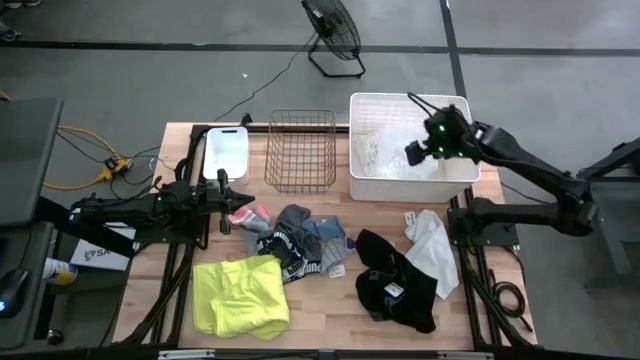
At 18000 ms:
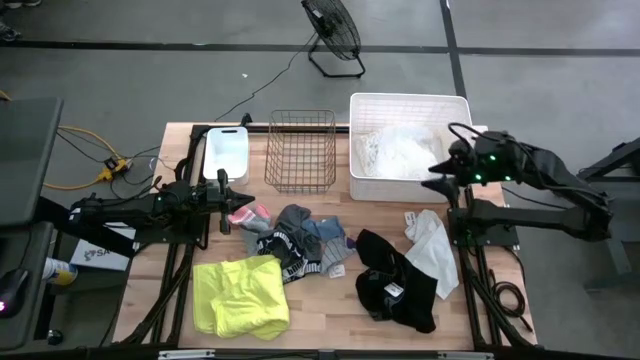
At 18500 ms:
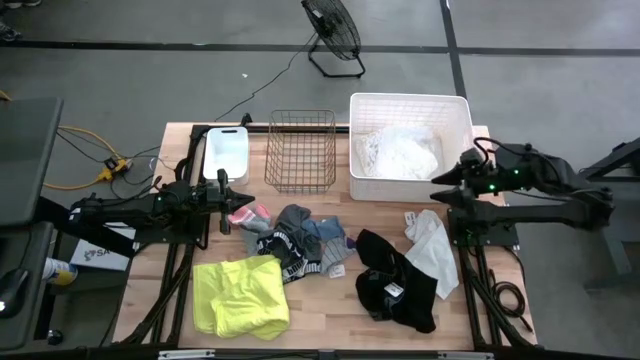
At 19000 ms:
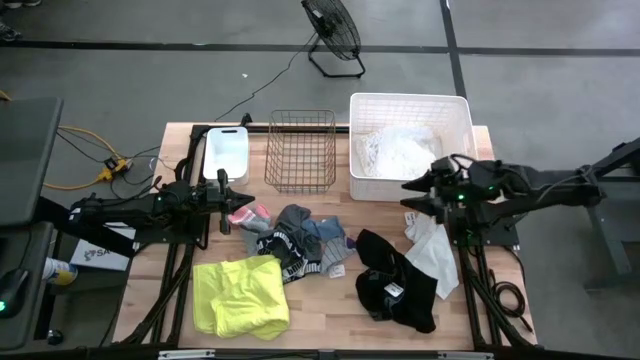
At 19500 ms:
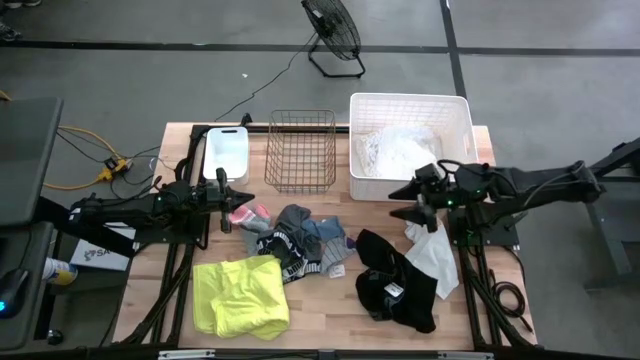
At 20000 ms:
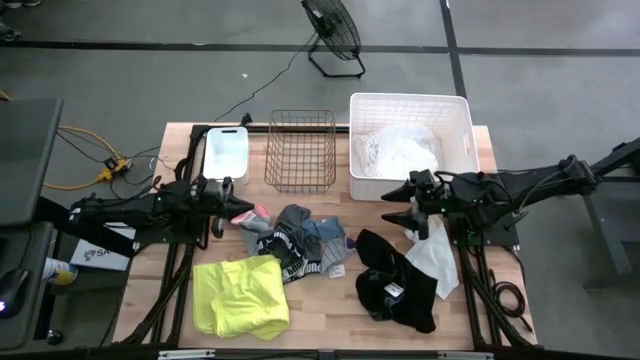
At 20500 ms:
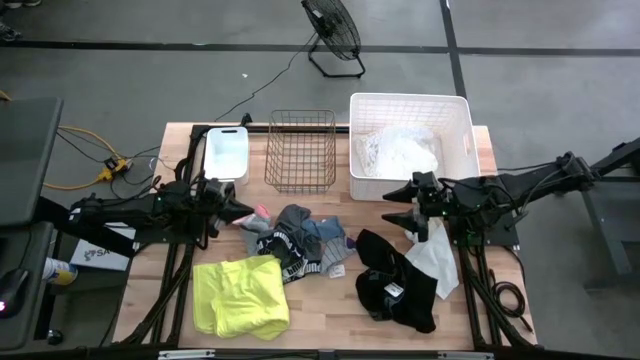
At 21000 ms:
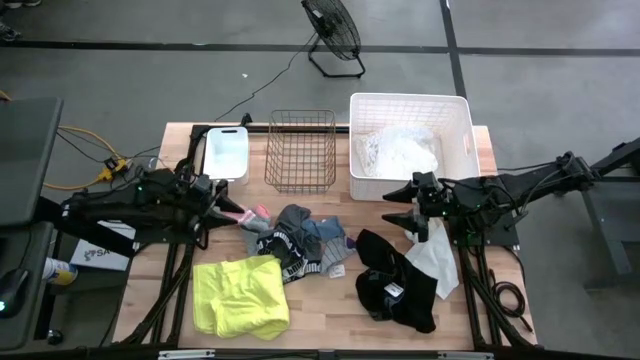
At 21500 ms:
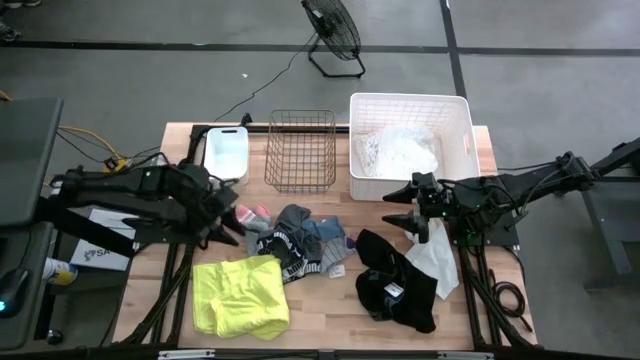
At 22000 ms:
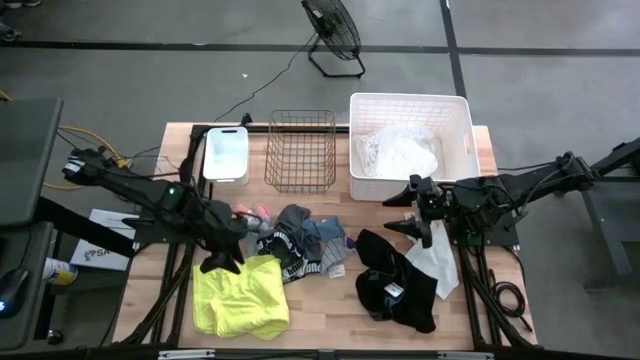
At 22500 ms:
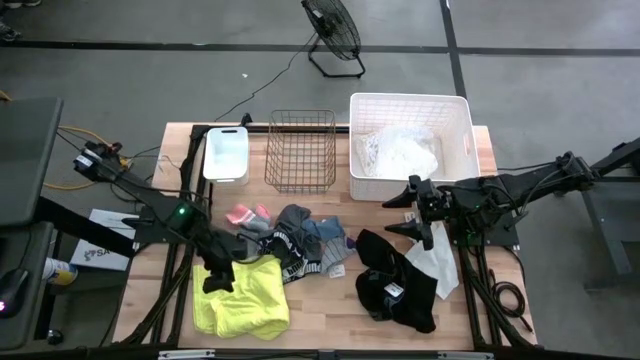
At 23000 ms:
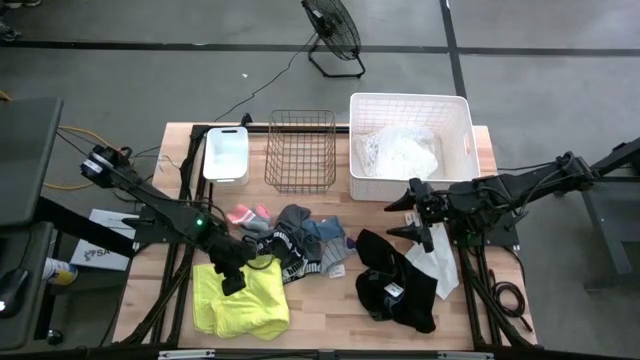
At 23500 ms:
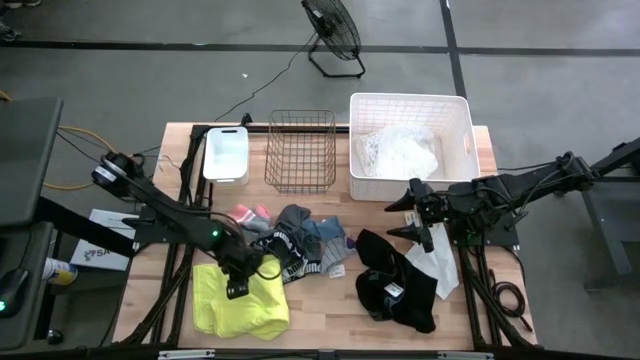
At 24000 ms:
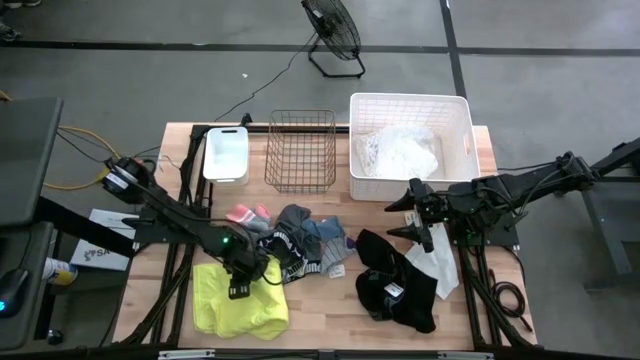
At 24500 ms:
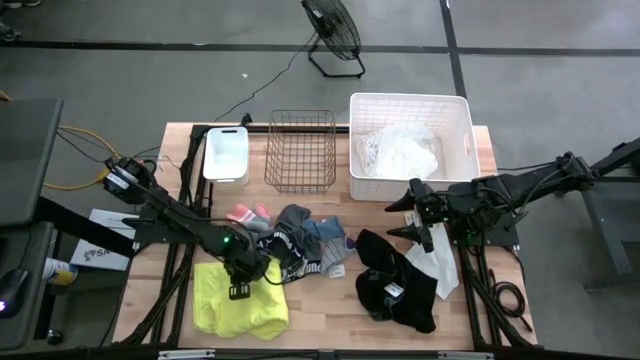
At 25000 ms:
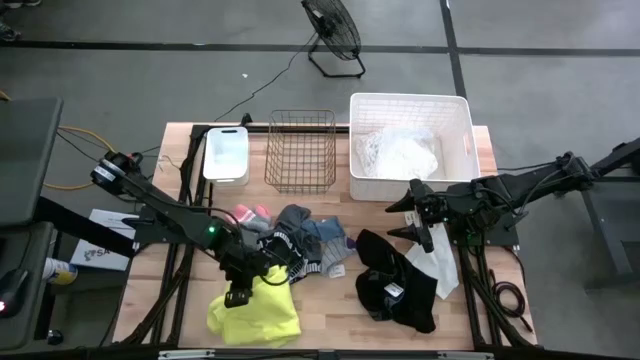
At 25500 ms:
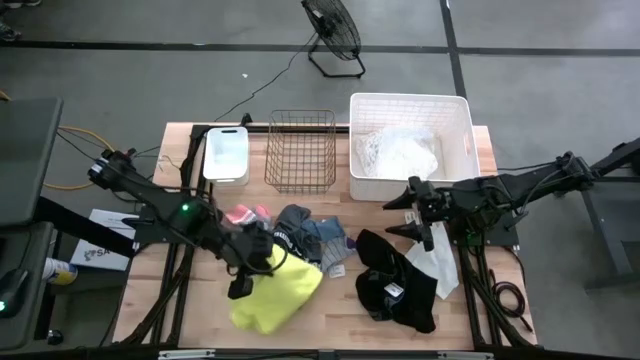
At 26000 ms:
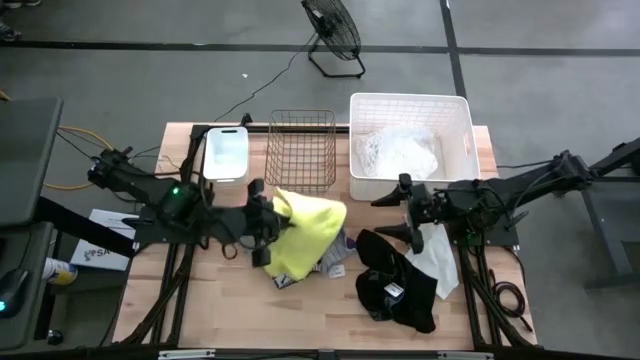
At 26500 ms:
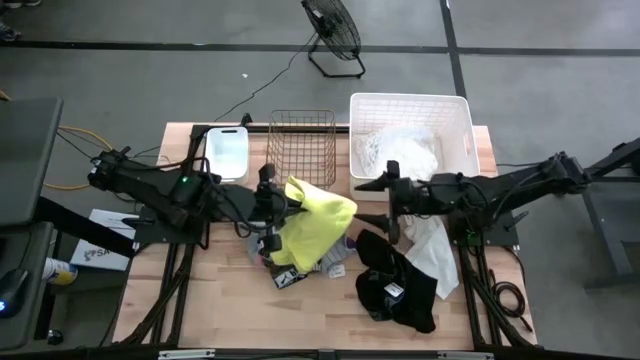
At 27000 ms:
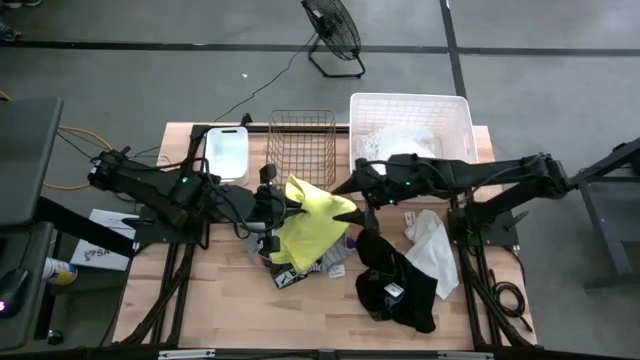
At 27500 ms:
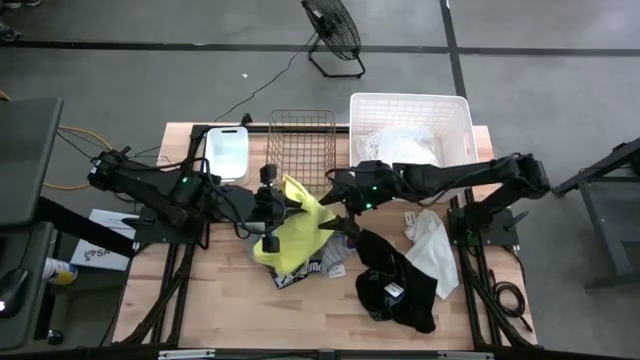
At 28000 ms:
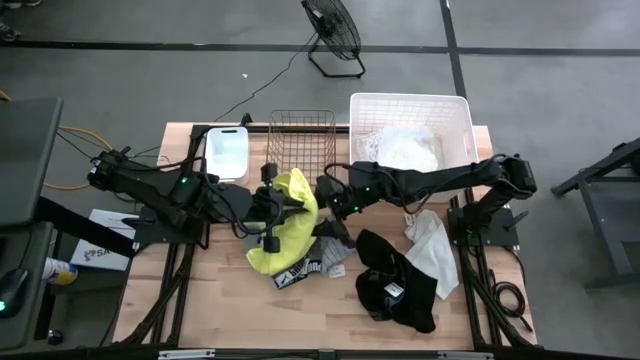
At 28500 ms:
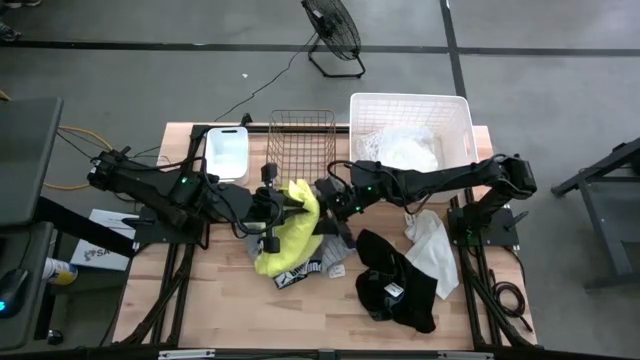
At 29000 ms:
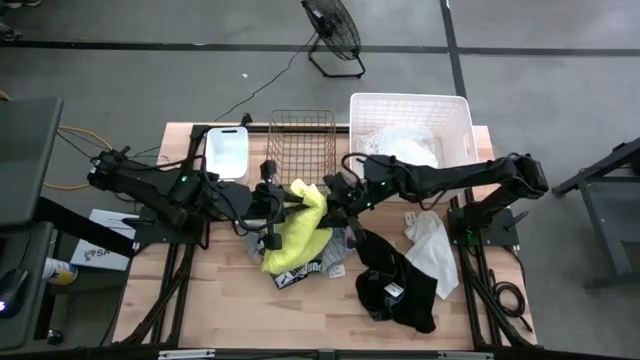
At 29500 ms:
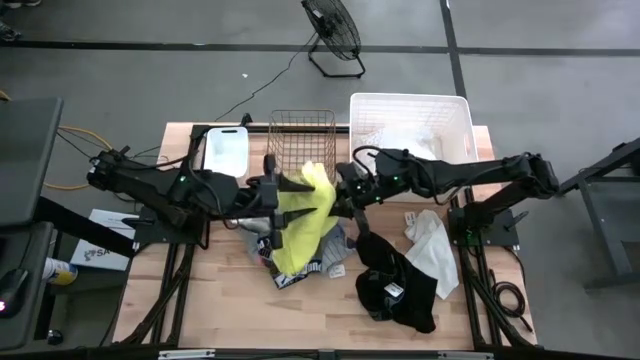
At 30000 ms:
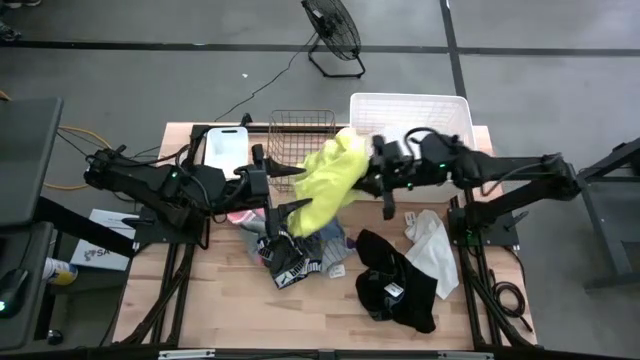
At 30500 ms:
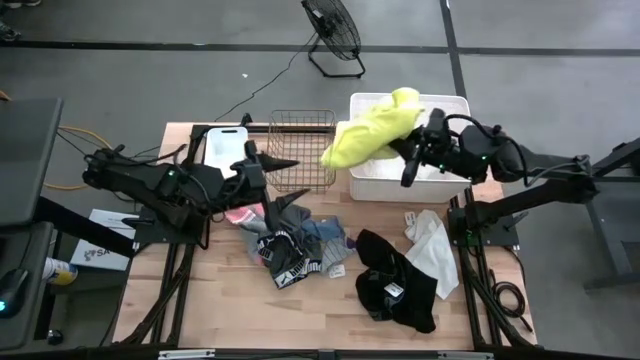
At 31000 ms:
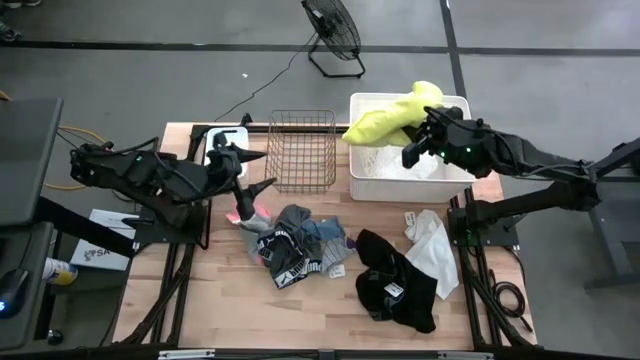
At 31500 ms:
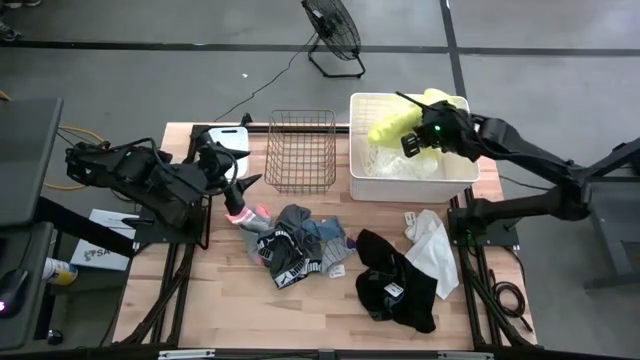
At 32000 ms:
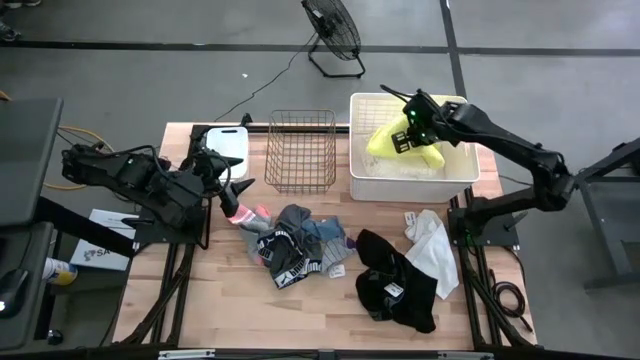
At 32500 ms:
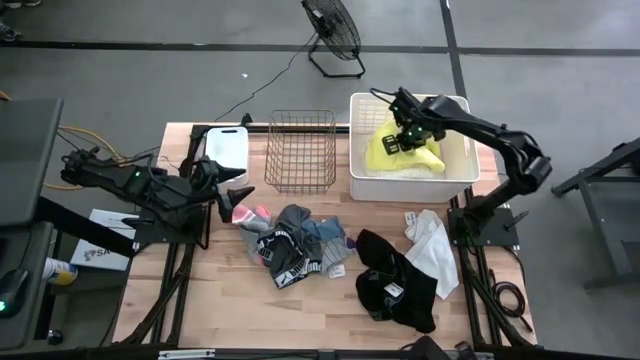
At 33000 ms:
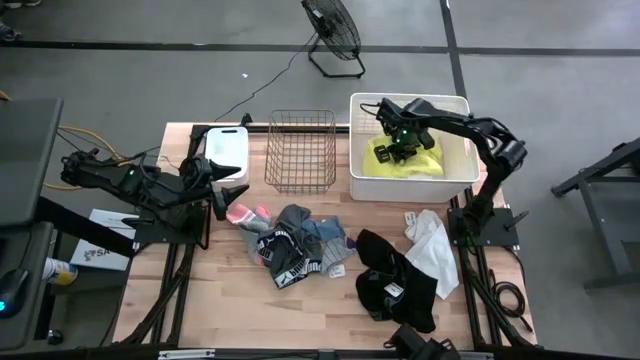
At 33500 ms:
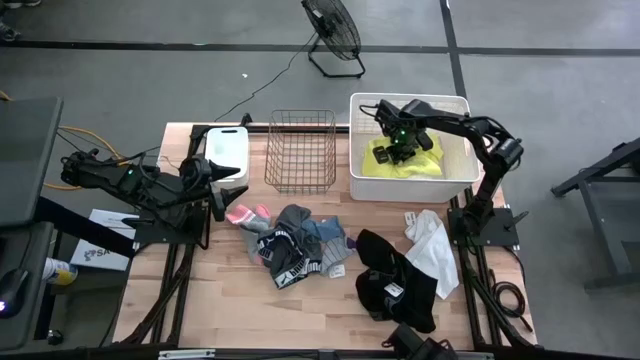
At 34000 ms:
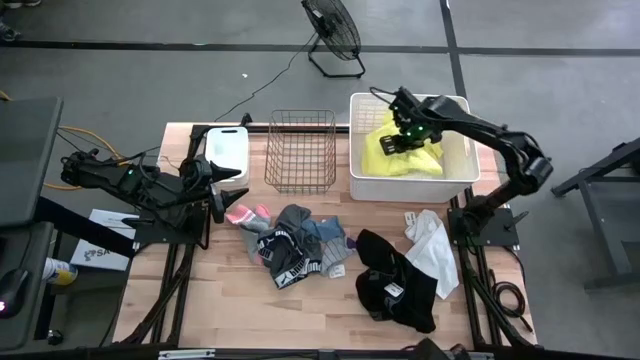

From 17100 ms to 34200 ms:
Task: Pick & Place Cloths
Put the yellow shirt into the right white bin

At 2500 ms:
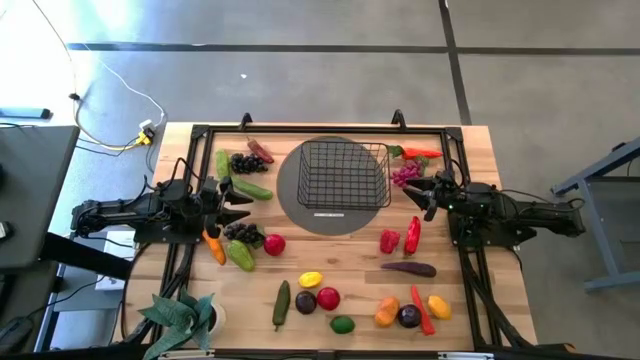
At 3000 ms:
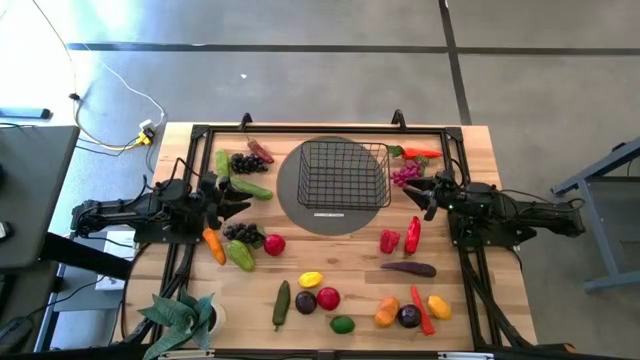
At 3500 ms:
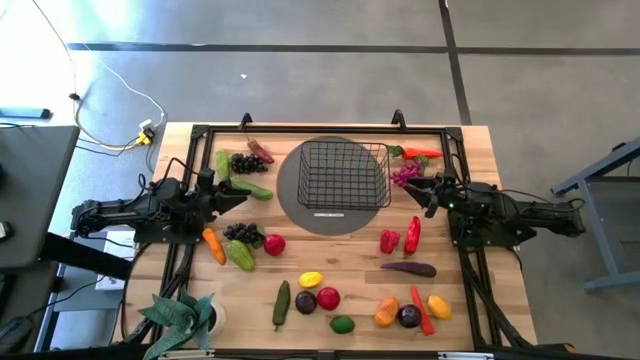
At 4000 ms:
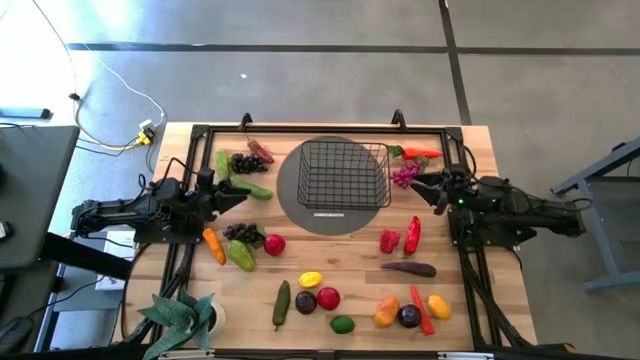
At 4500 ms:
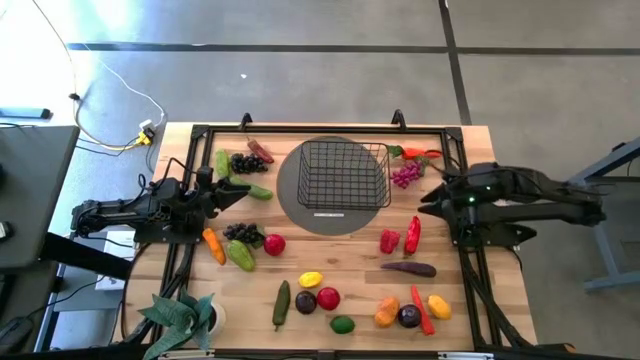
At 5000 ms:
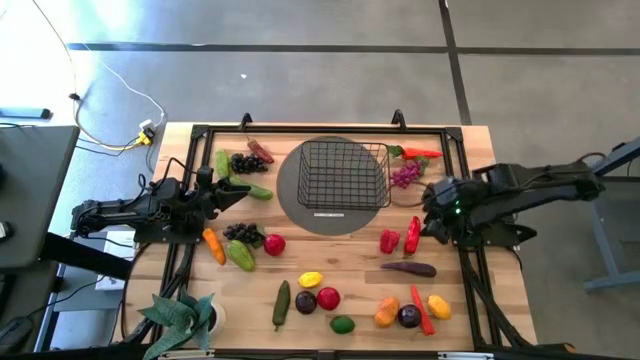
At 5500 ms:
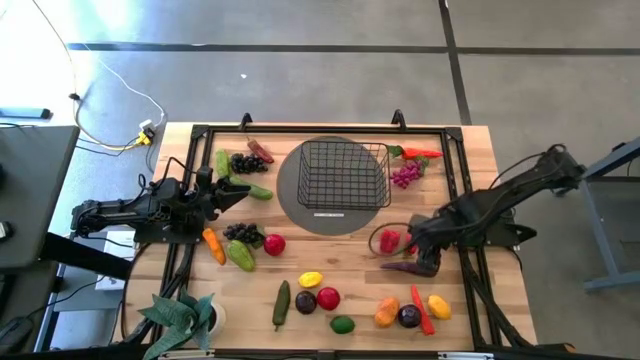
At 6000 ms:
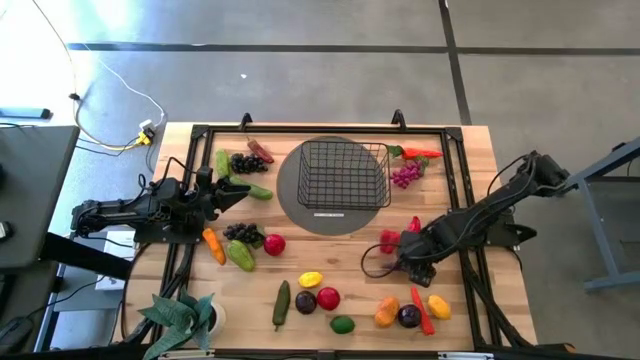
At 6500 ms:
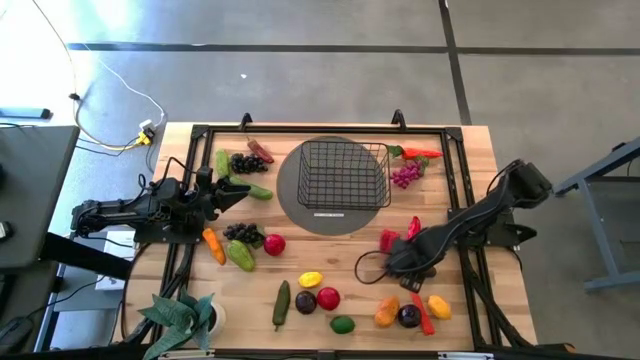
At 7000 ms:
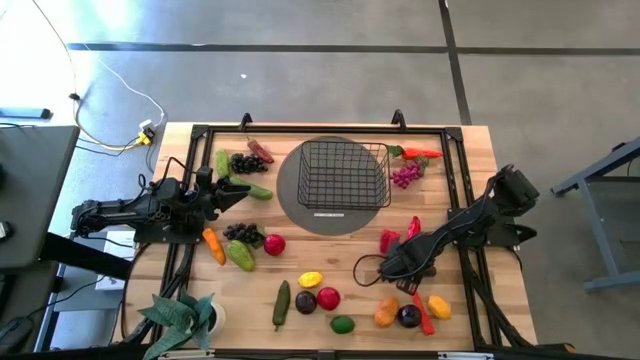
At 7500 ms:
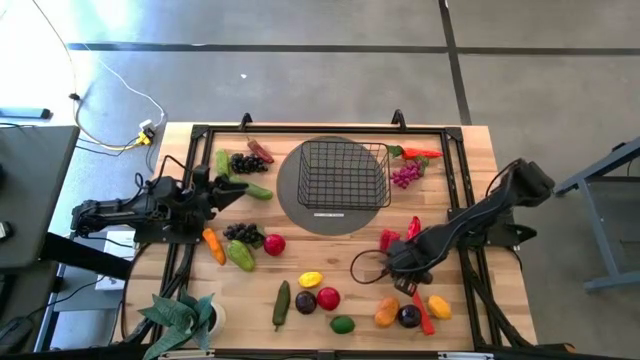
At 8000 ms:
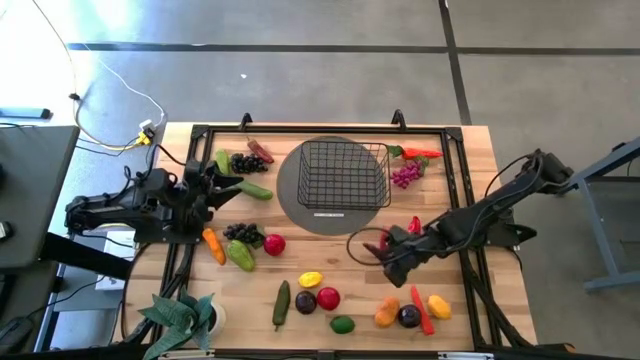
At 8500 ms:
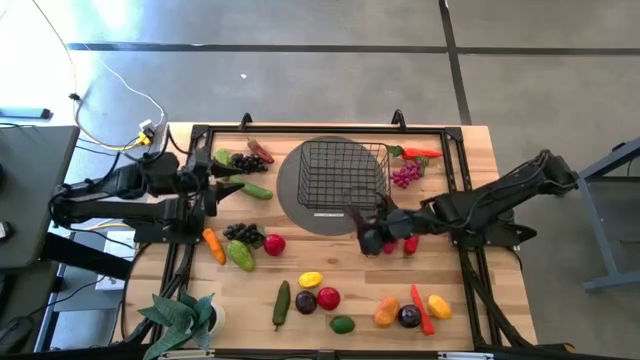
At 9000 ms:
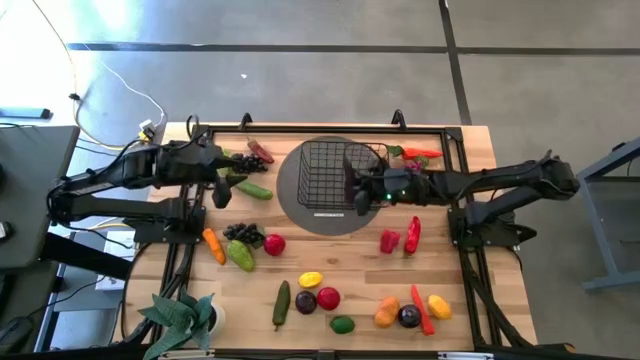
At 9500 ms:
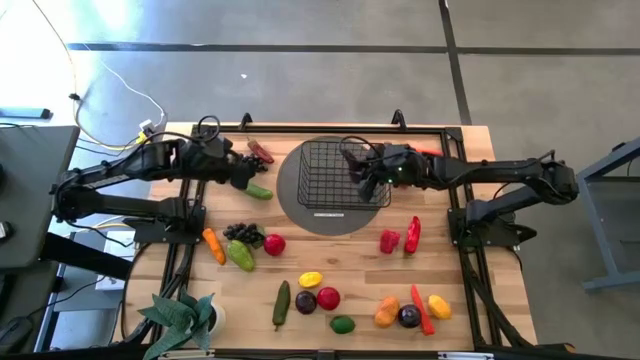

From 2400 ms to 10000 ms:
Task: Build produce basket
Put the purple eggplant into the black mesh basket
